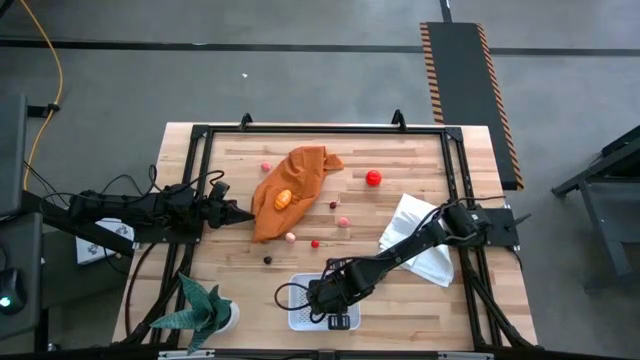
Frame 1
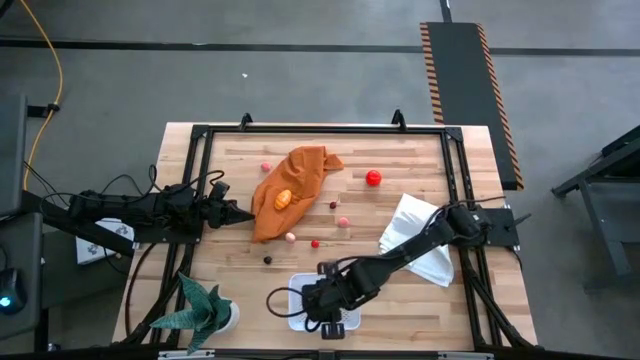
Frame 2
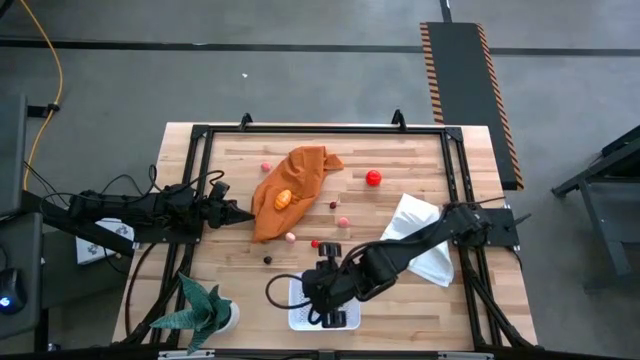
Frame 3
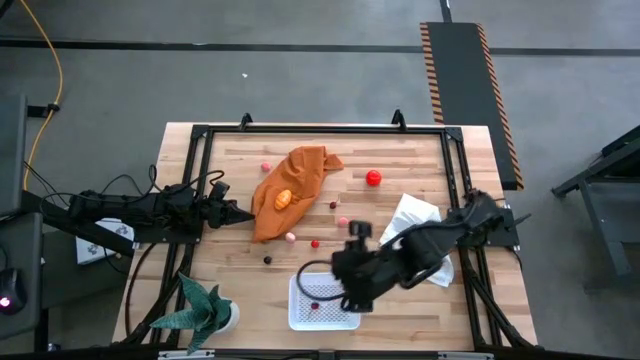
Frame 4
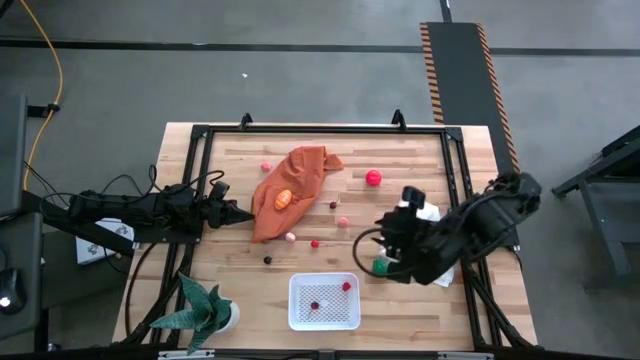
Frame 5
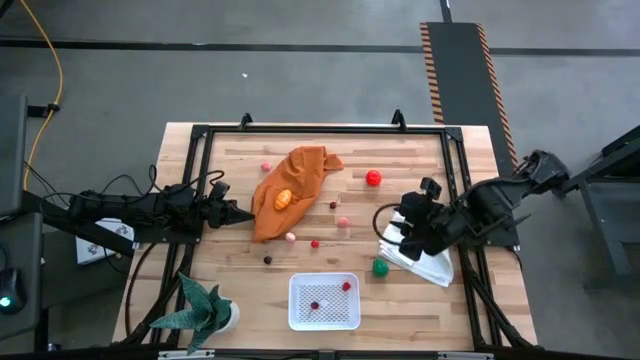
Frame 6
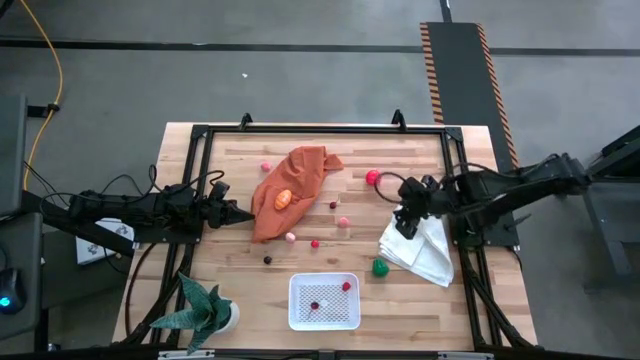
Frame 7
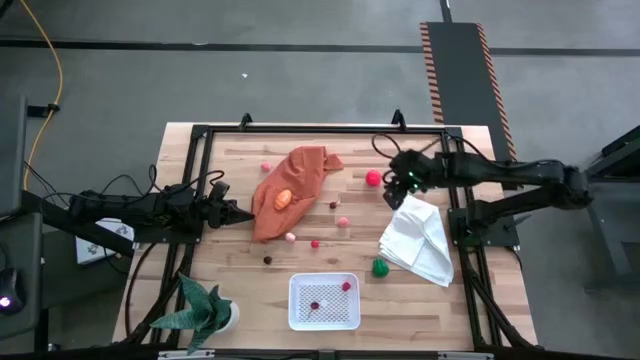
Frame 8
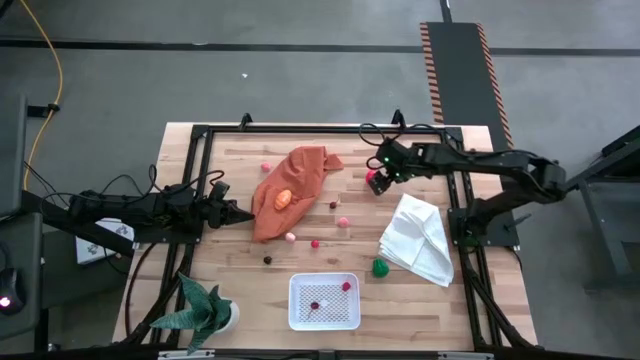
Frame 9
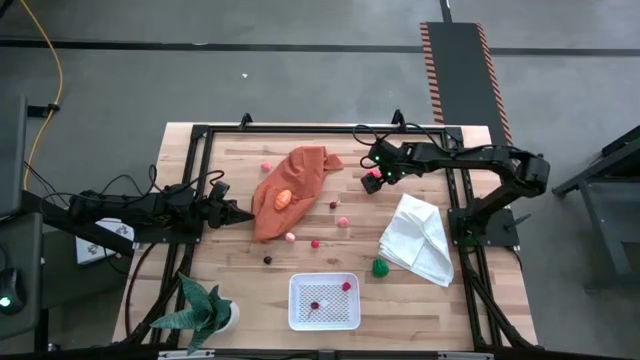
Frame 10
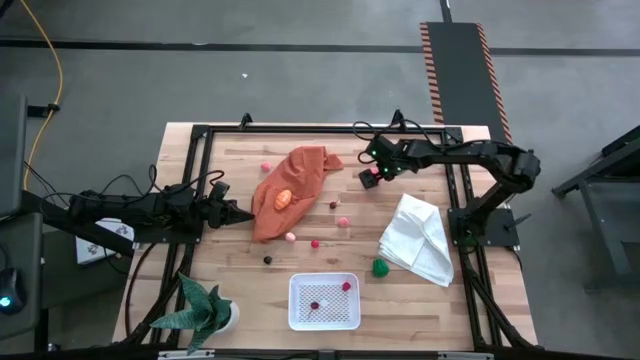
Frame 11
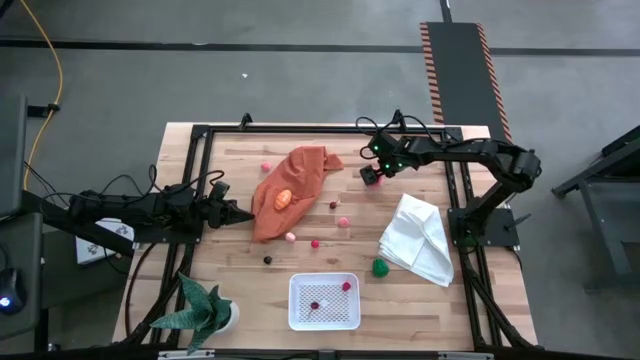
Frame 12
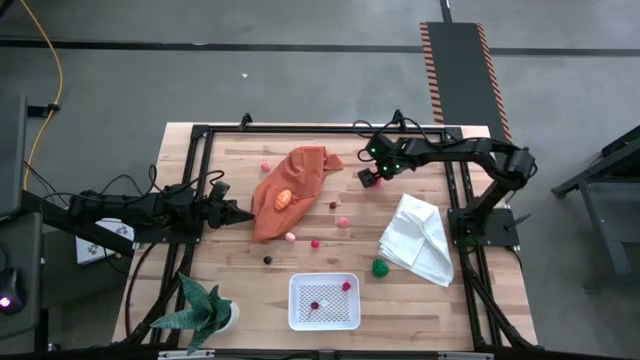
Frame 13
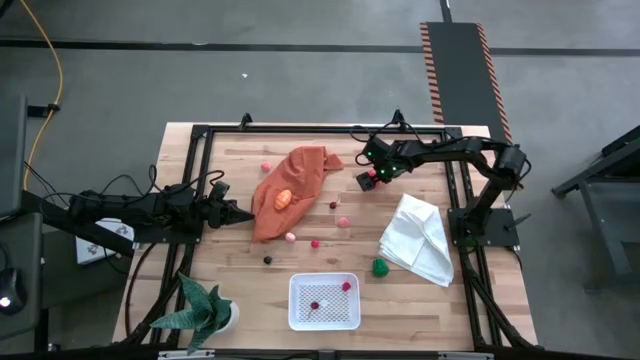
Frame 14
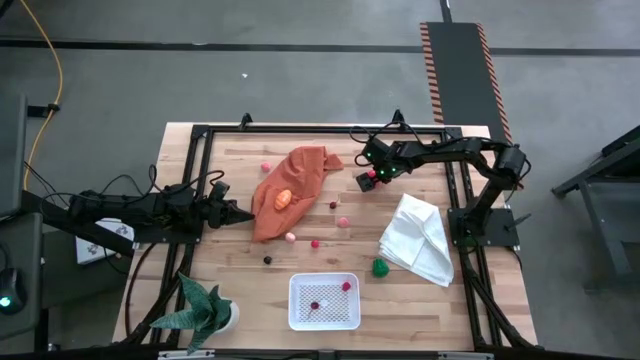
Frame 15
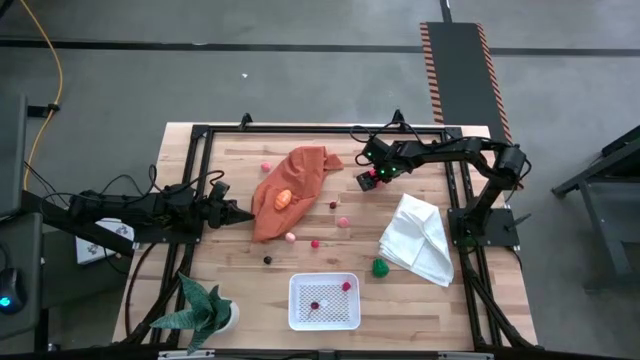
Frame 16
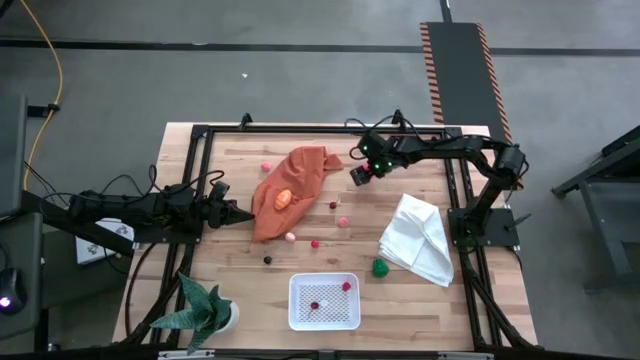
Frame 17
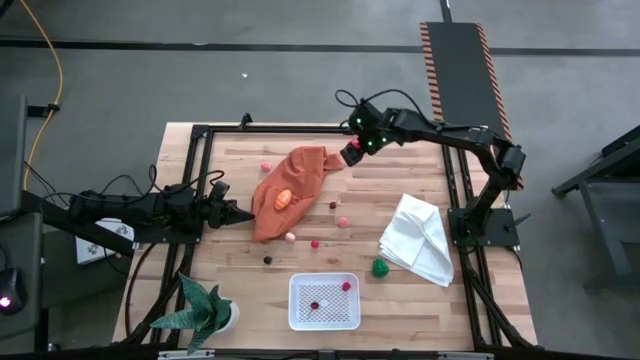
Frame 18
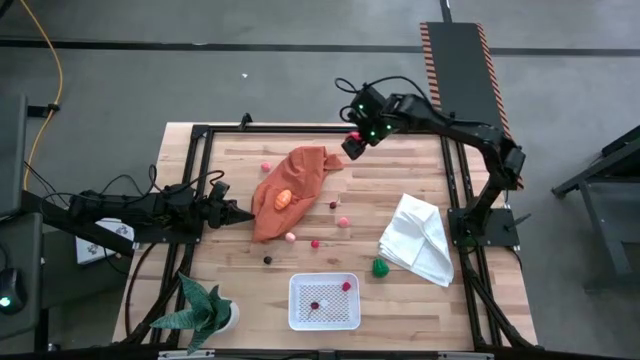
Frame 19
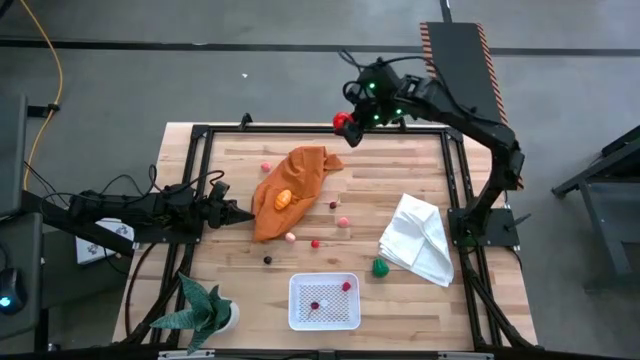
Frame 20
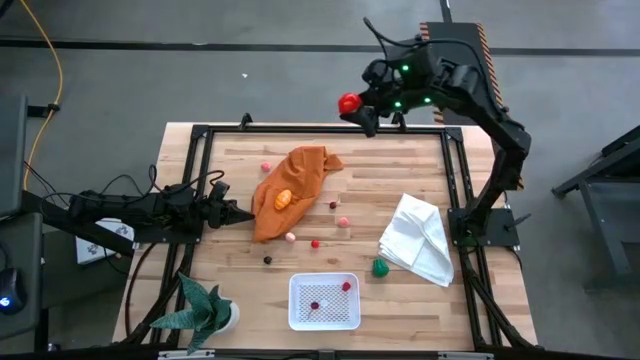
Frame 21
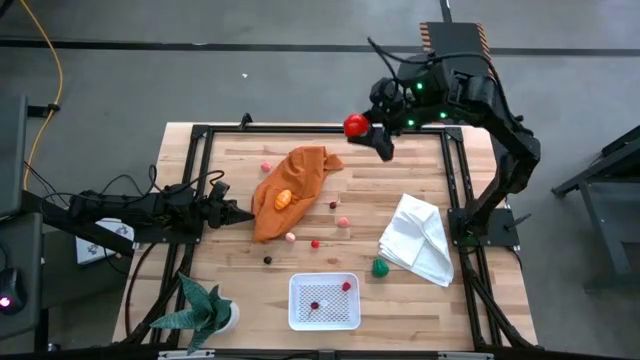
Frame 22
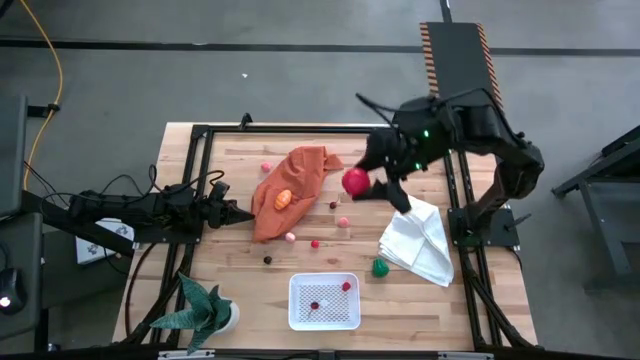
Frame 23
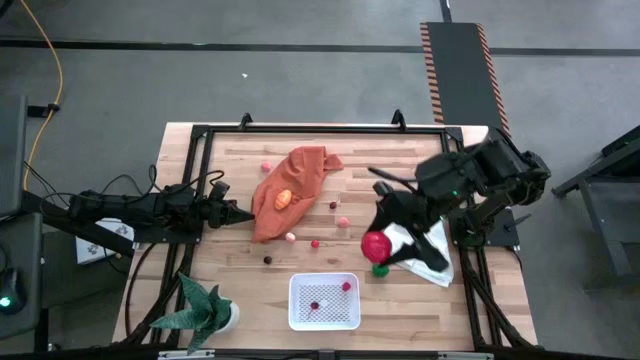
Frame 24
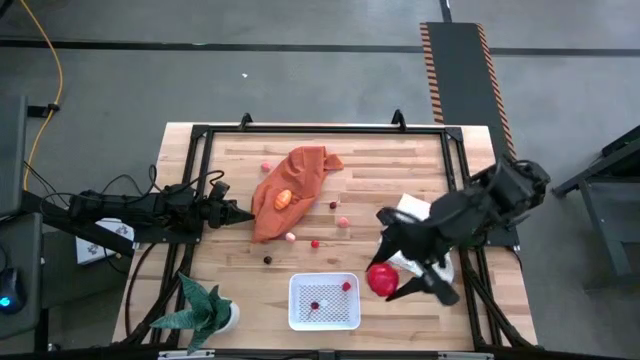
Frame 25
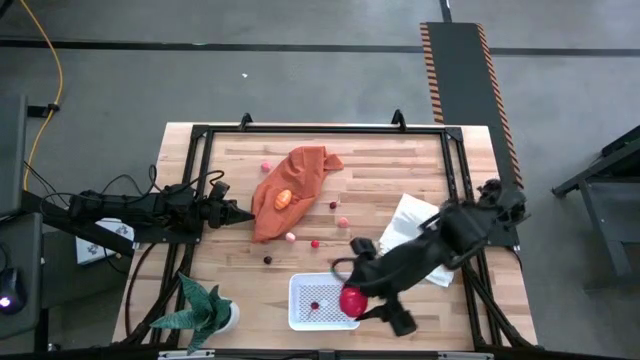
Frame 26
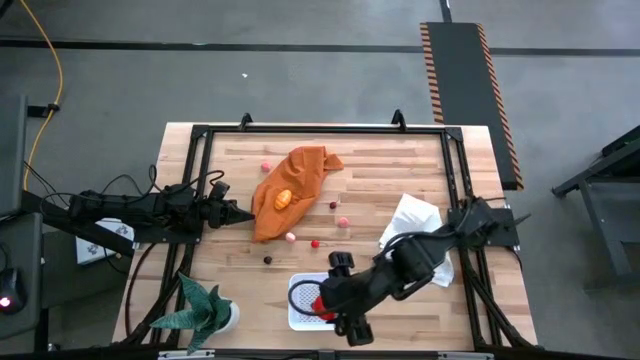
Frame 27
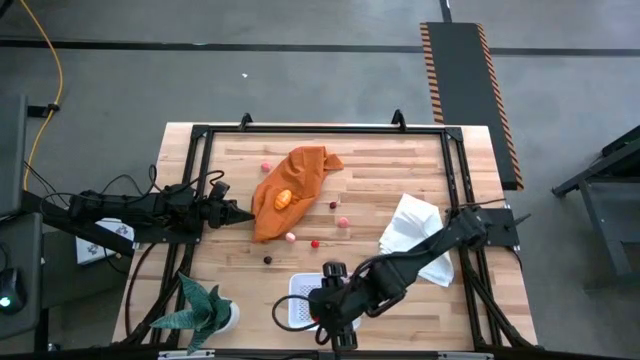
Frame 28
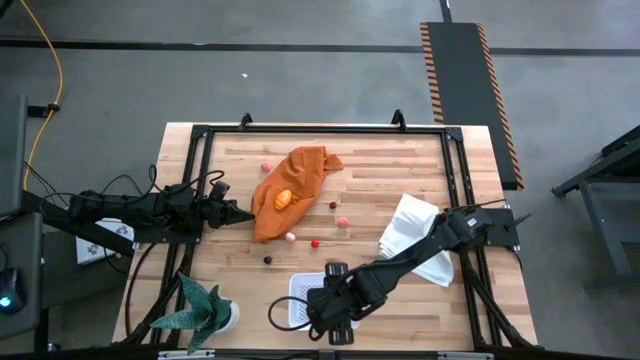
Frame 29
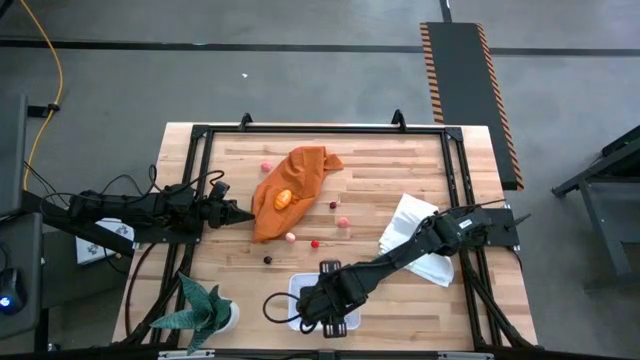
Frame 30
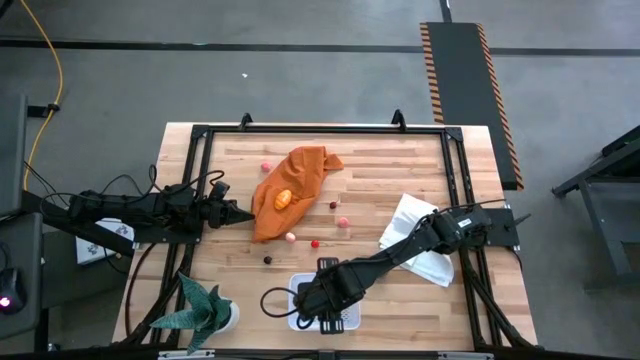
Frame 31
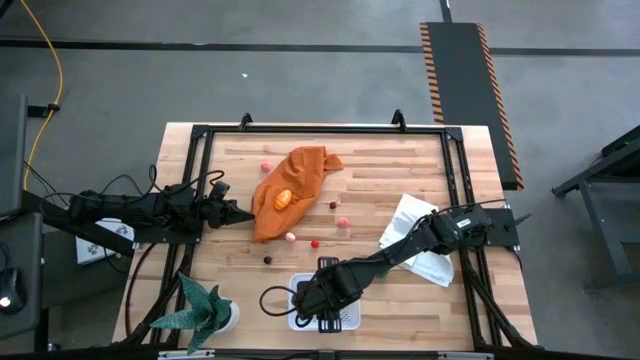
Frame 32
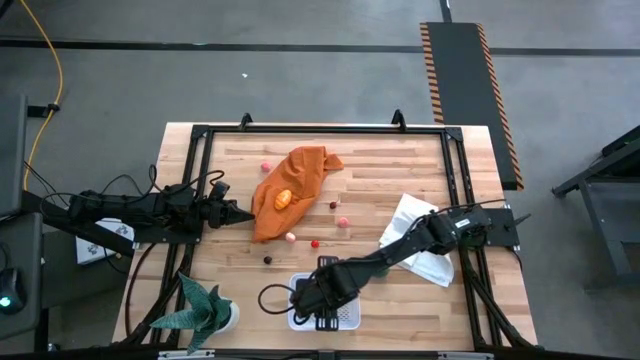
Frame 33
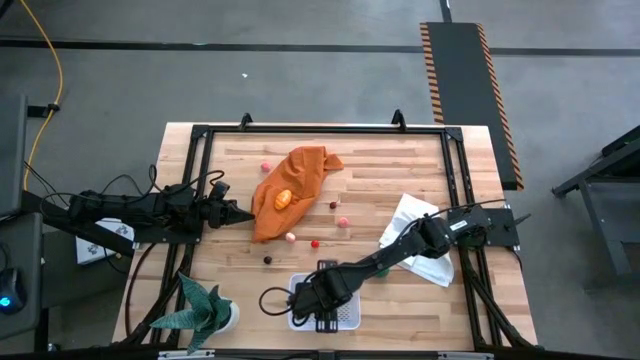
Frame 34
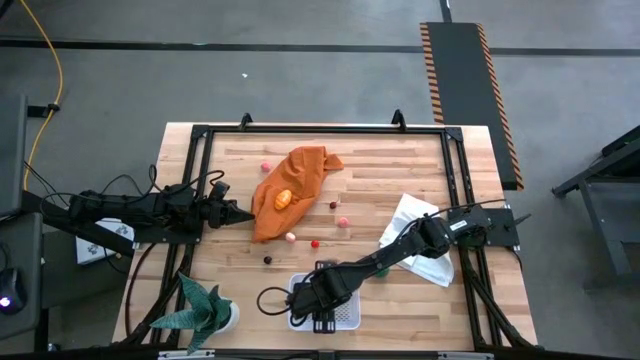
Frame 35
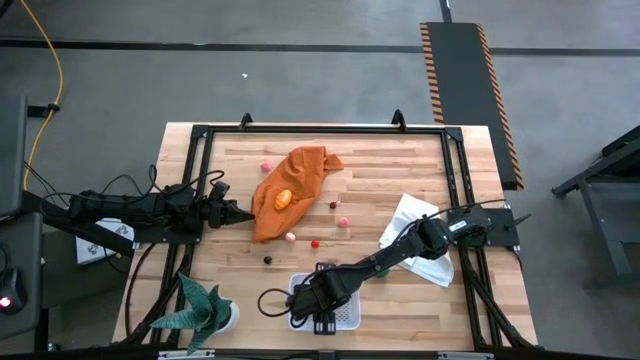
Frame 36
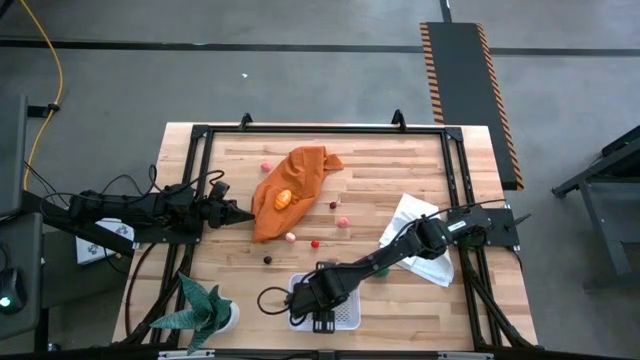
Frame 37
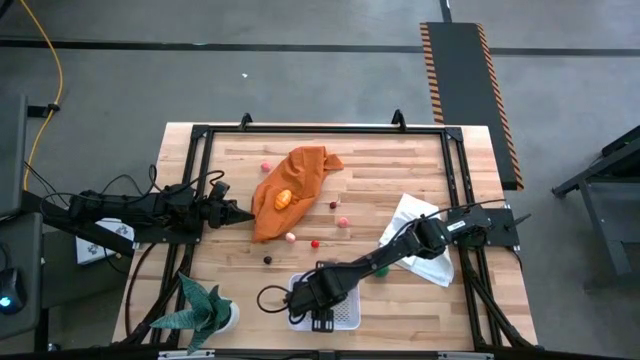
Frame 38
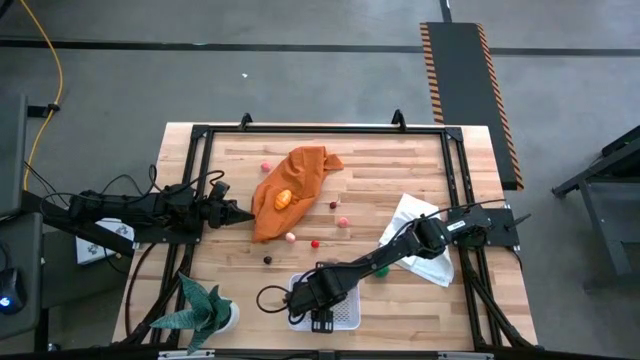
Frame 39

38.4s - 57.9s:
Task: Pick and placing Produce into tupperware
Put the red tomato into the white bin
